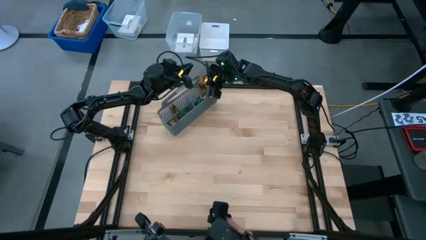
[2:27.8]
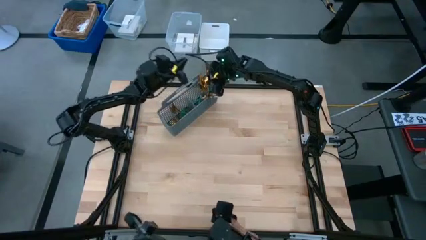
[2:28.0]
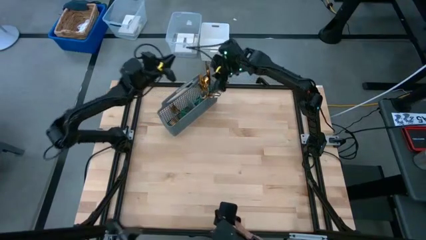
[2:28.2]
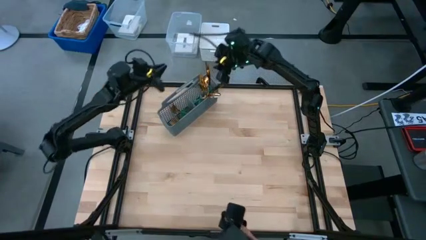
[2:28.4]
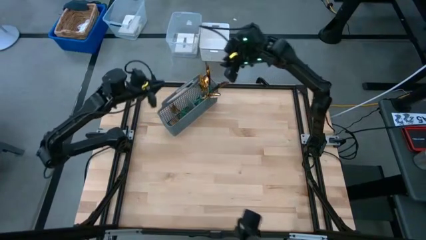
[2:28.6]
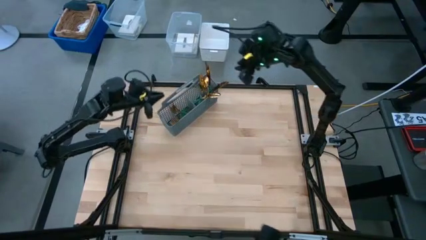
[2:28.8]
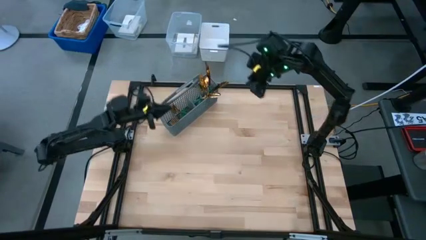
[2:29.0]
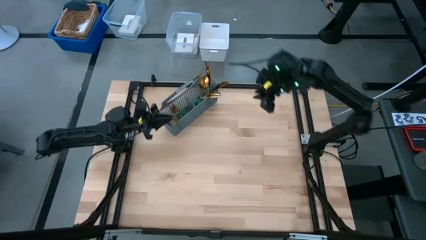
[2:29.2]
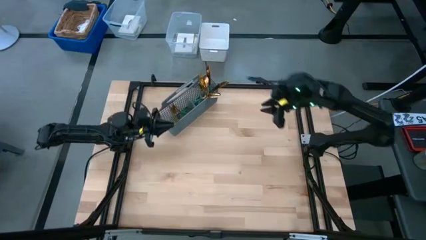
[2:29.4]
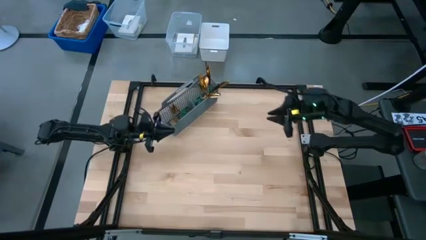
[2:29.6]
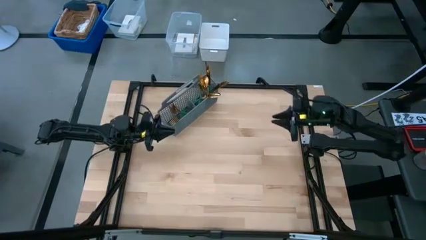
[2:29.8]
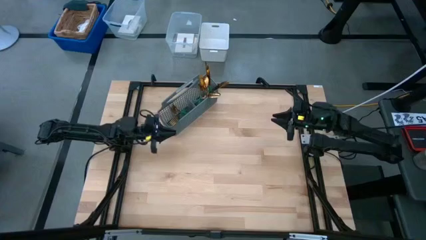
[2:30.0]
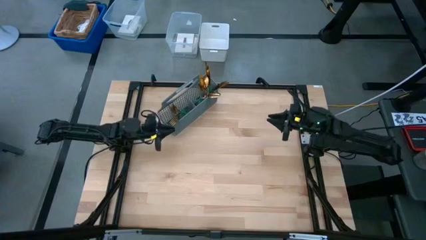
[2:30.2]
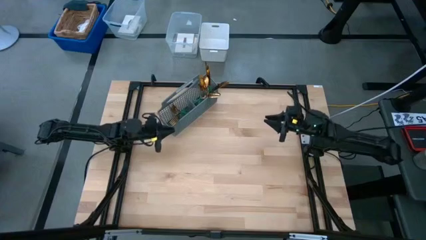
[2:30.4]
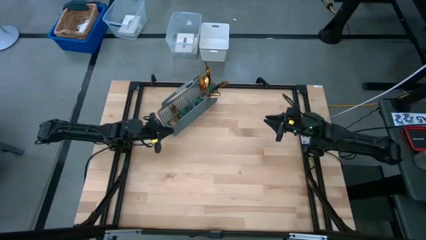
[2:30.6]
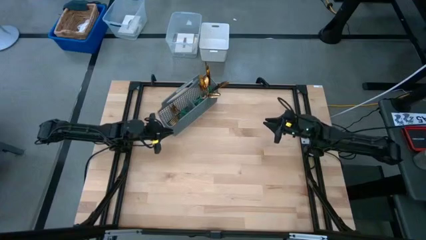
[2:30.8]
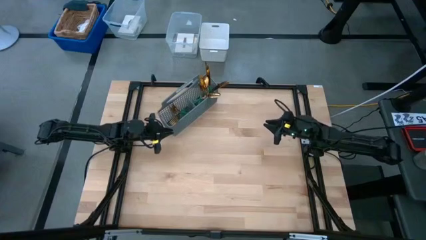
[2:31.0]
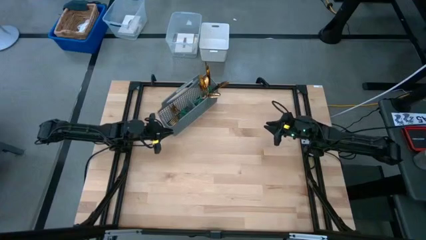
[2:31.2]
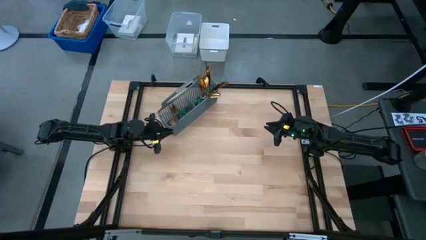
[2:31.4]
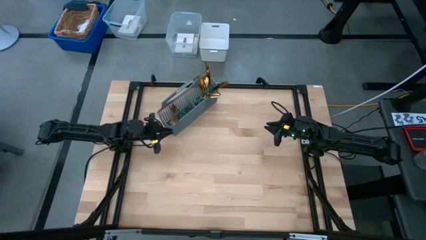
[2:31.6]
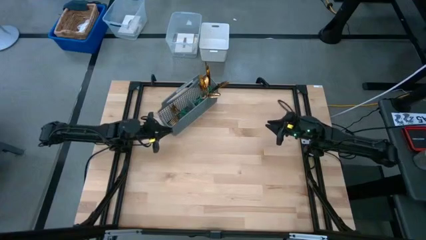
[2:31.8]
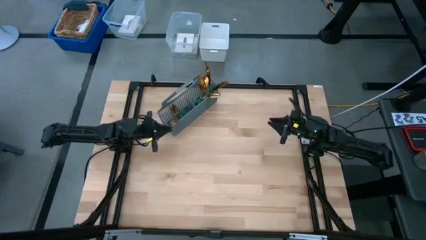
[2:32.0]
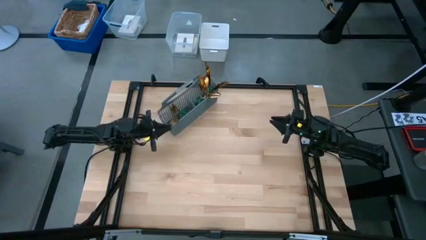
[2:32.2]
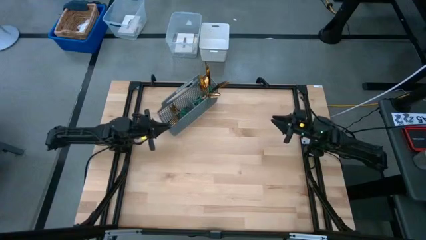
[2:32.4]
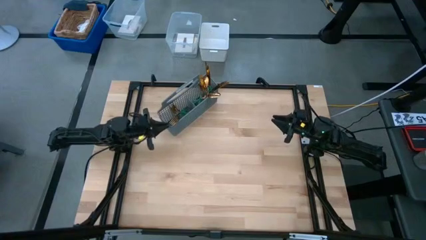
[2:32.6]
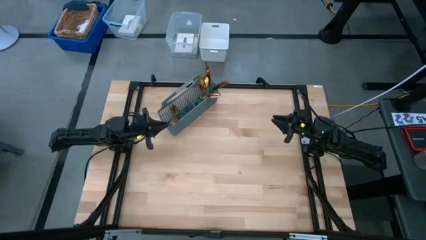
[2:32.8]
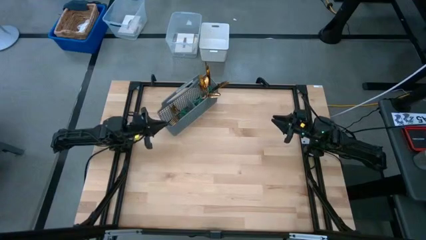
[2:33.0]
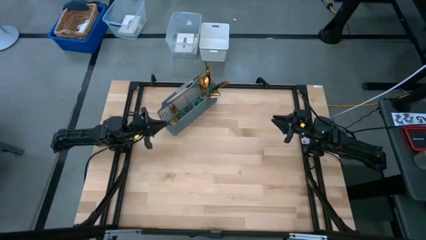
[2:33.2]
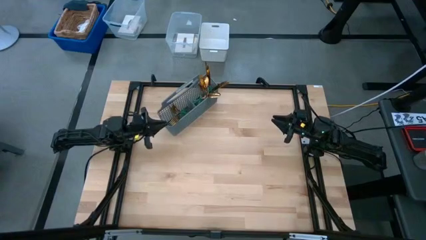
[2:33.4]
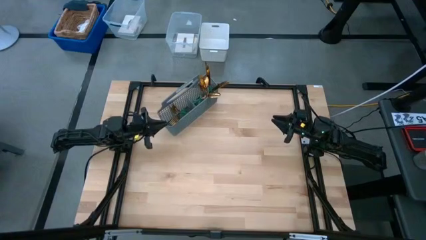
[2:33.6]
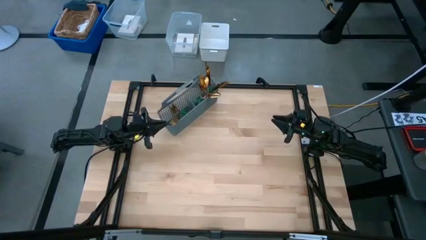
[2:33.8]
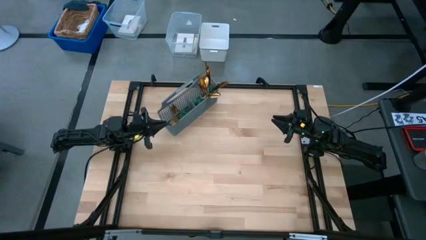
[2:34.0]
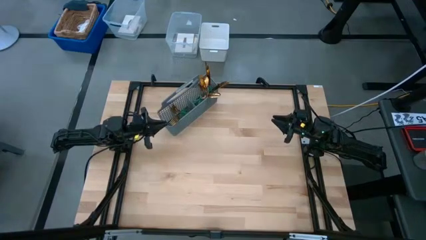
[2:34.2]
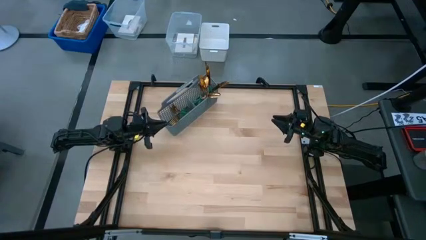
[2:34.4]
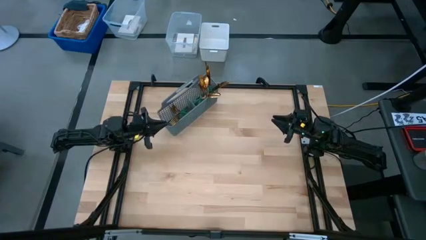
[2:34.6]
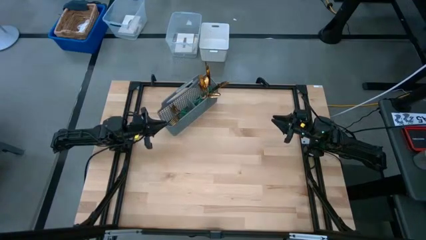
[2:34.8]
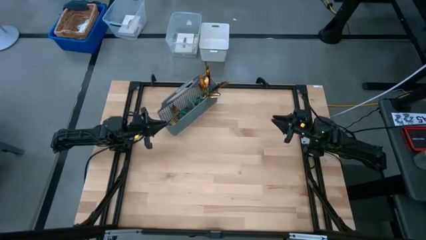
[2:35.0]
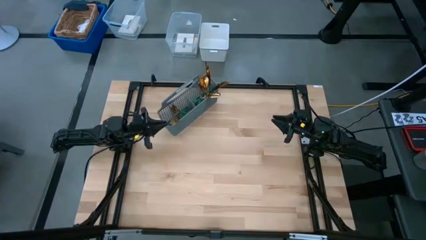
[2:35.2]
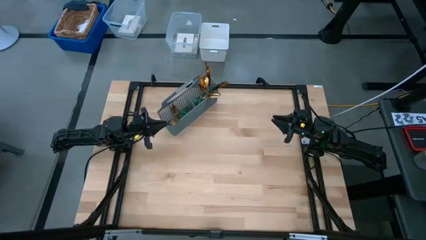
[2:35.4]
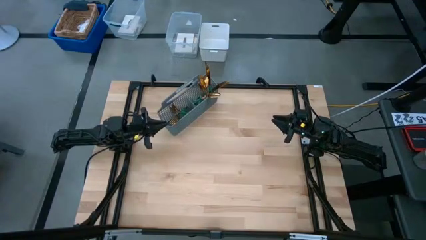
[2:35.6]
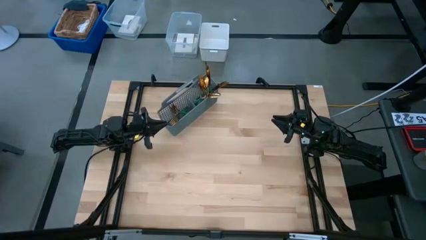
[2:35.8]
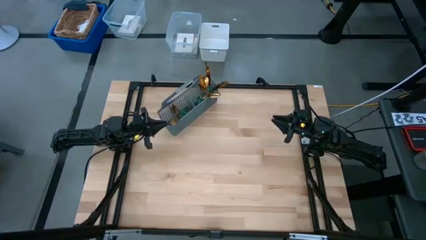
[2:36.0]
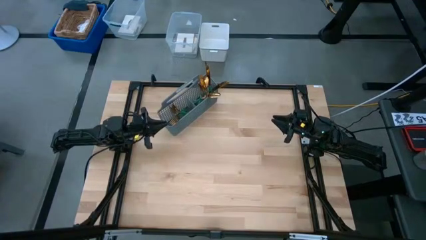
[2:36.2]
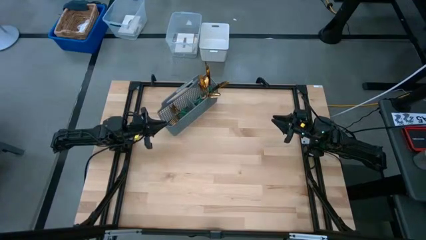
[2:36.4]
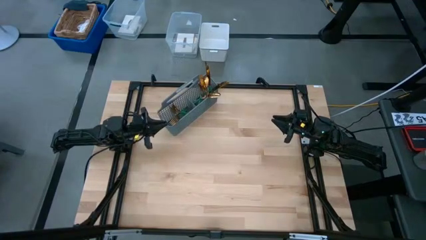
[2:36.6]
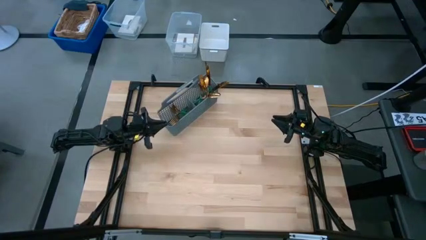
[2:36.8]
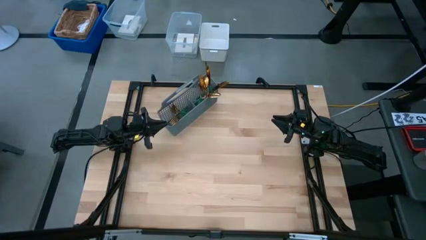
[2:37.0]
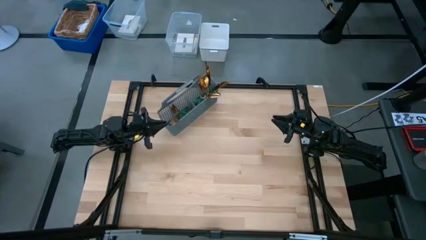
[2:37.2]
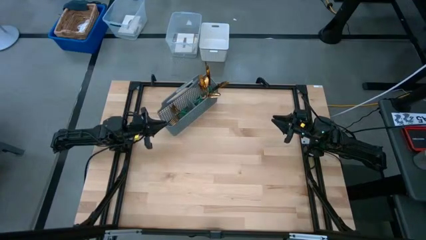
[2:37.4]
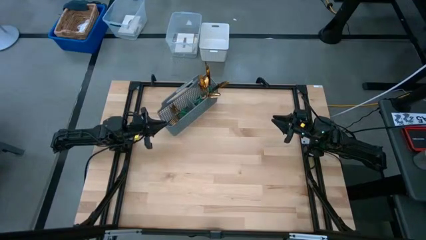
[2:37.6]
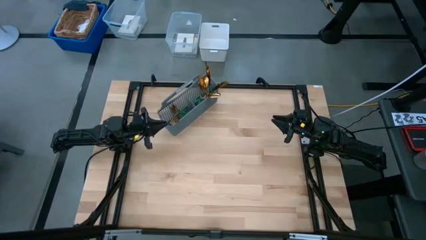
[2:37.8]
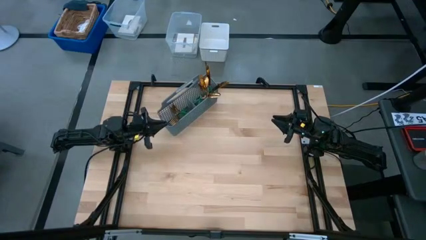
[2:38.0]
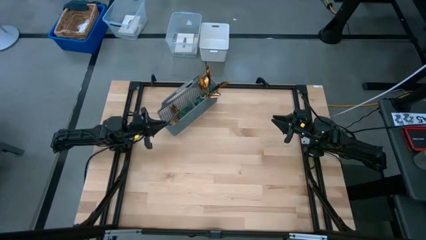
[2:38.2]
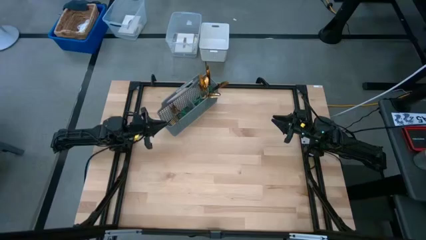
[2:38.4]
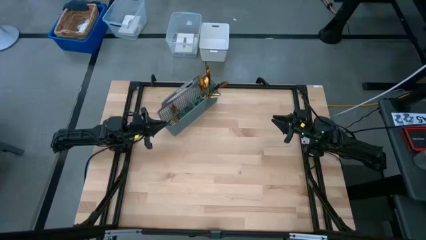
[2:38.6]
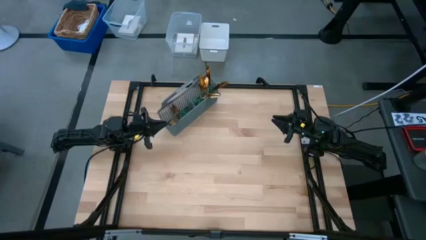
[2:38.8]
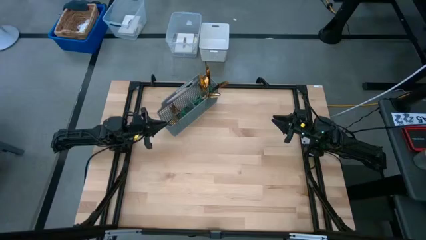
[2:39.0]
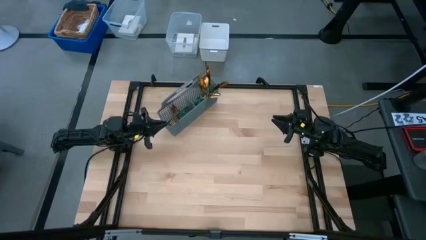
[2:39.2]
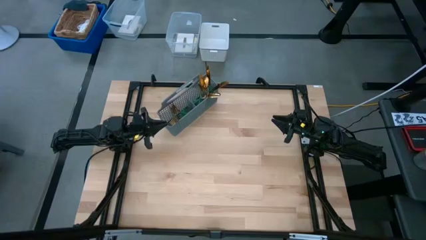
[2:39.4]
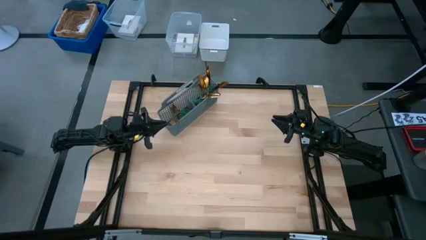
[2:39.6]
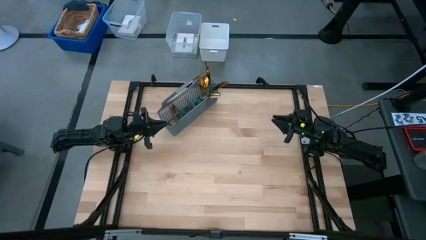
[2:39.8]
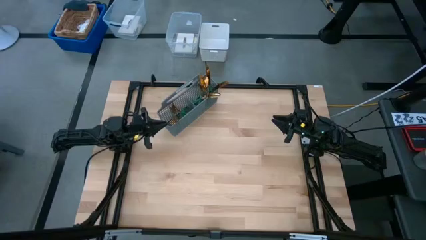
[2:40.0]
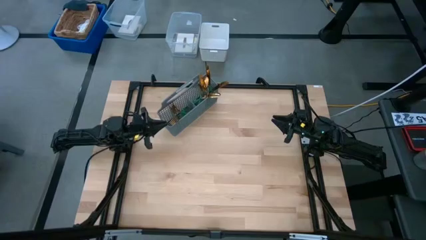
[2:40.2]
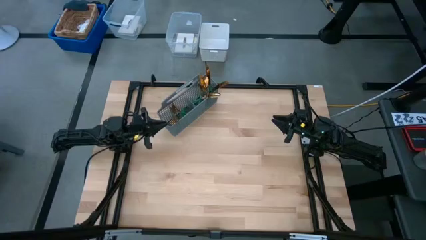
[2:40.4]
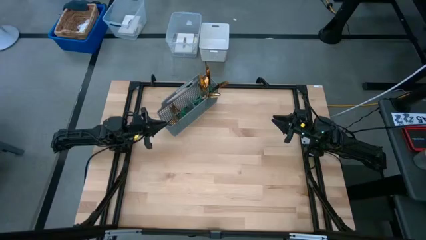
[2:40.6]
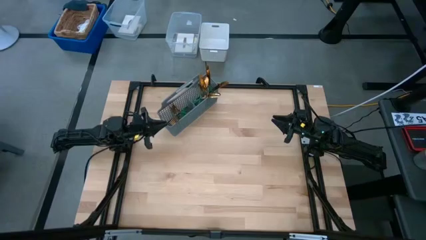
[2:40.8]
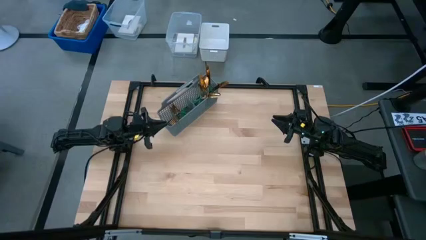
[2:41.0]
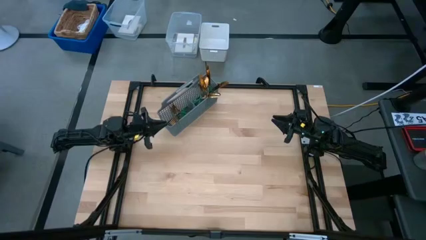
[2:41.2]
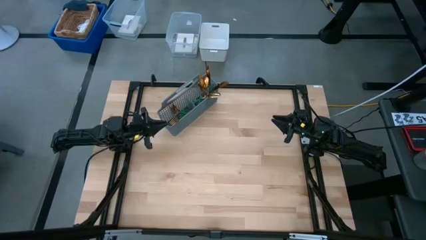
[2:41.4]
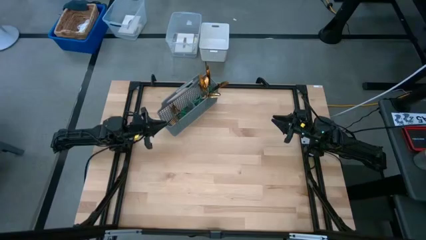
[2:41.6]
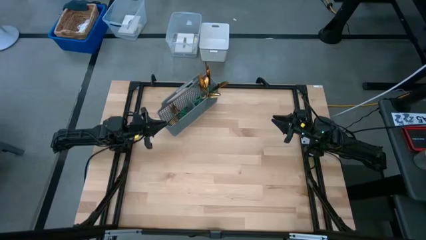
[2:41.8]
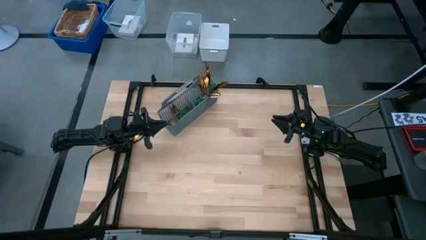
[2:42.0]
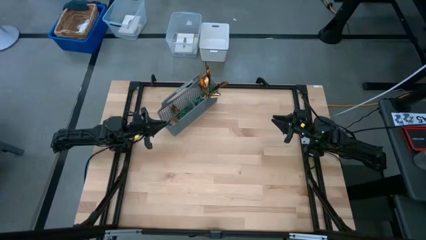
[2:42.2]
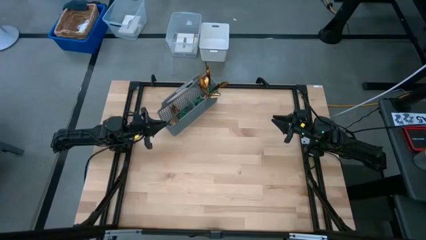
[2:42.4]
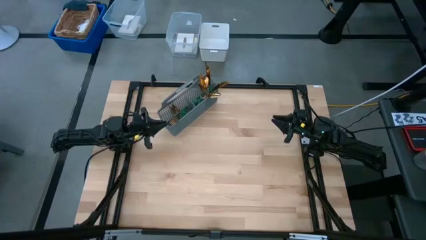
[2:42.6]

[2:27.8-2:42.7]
Task: Sort silverware
Return to Home Position
